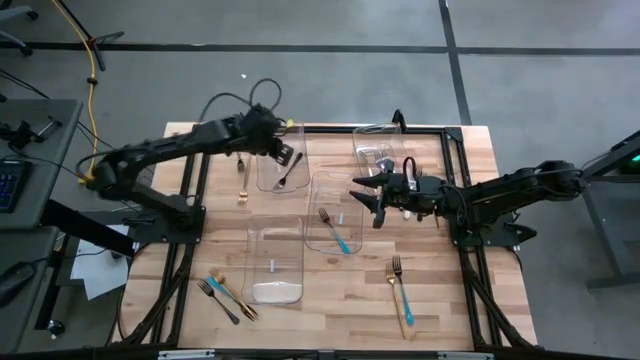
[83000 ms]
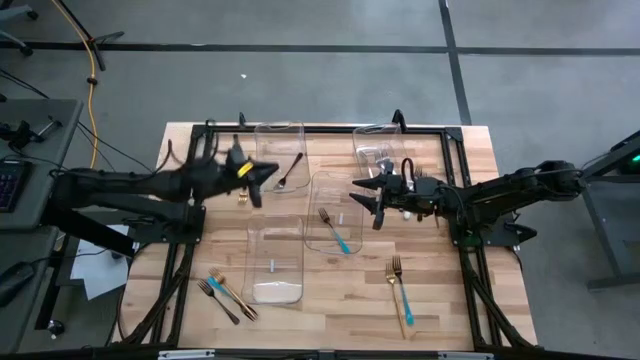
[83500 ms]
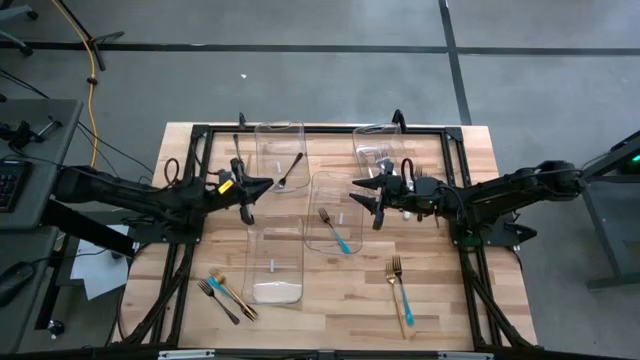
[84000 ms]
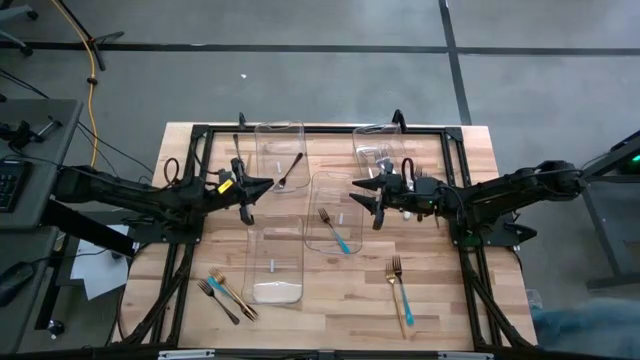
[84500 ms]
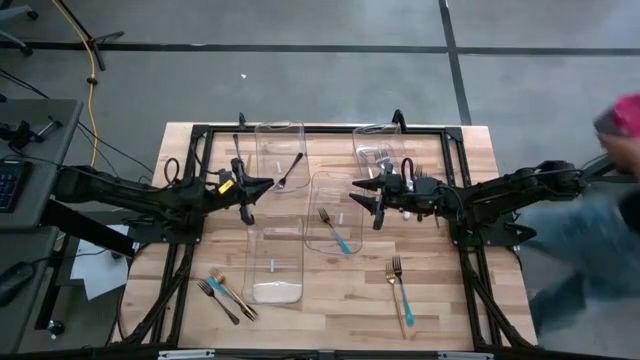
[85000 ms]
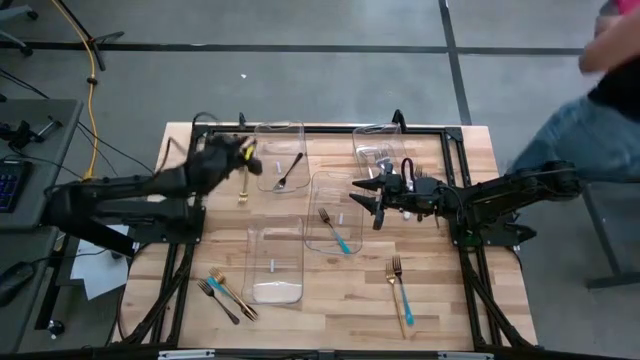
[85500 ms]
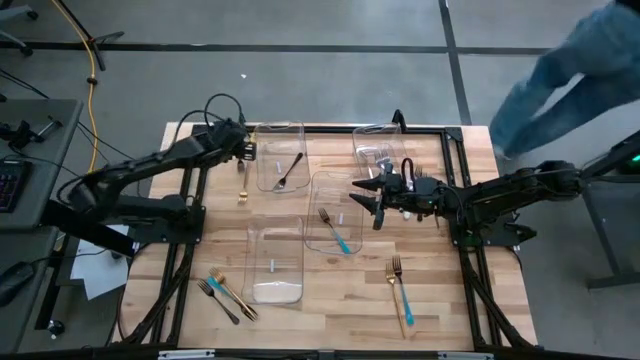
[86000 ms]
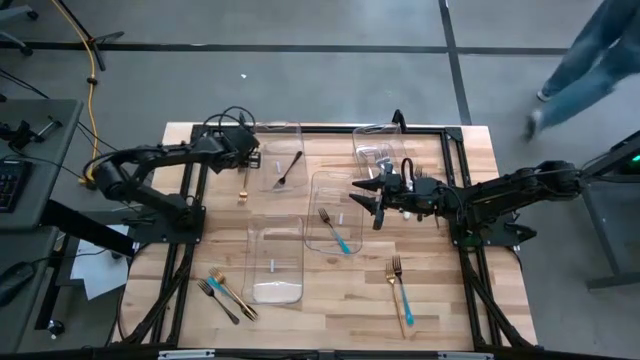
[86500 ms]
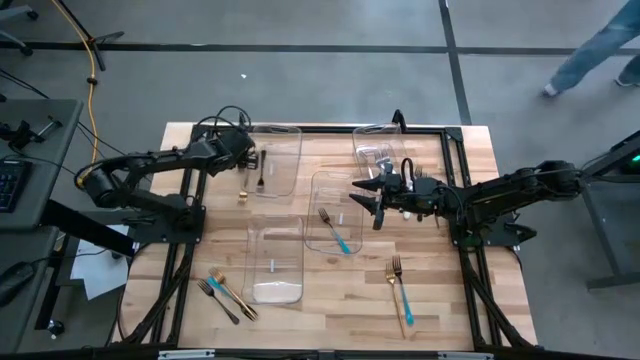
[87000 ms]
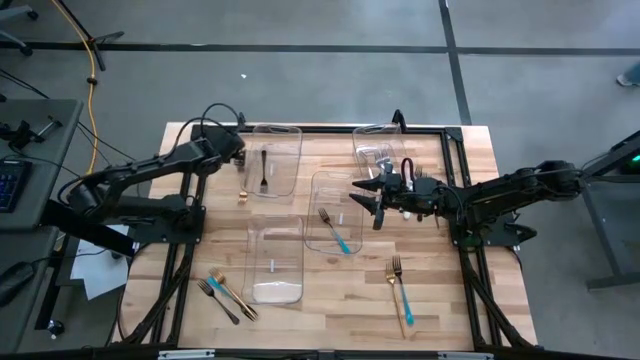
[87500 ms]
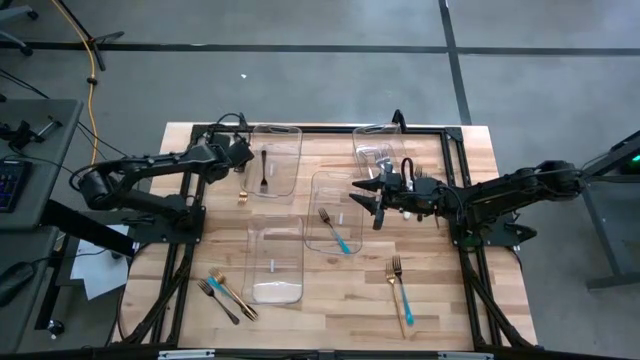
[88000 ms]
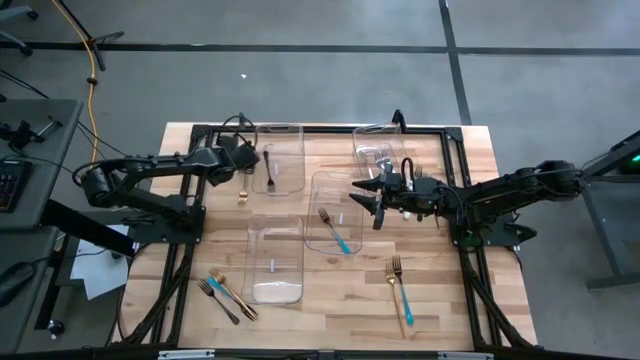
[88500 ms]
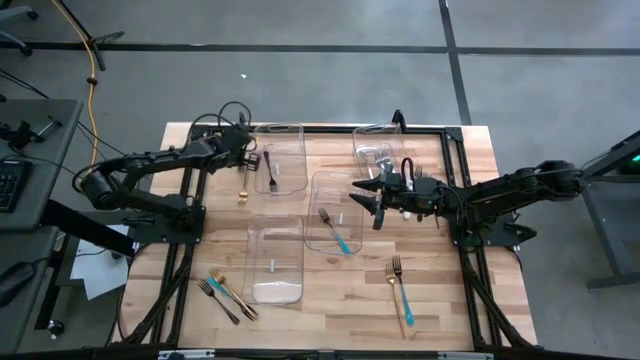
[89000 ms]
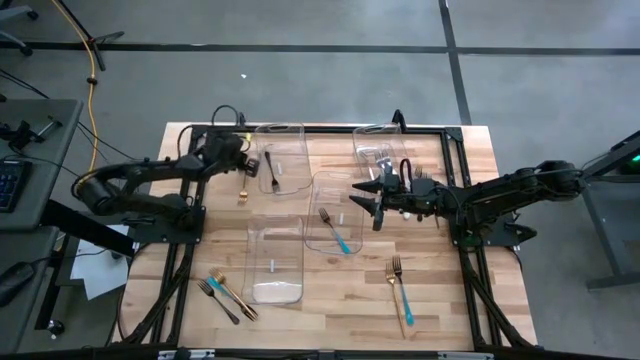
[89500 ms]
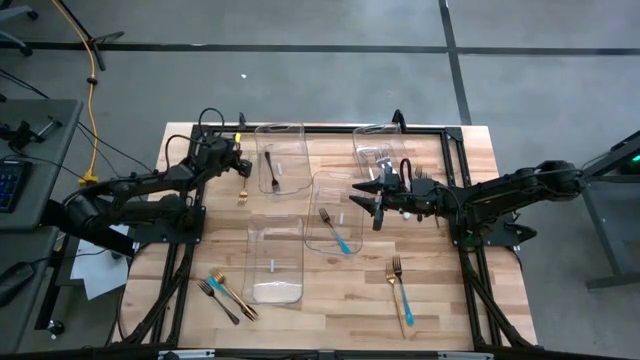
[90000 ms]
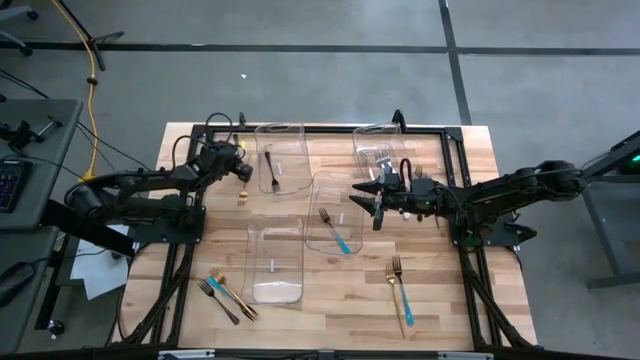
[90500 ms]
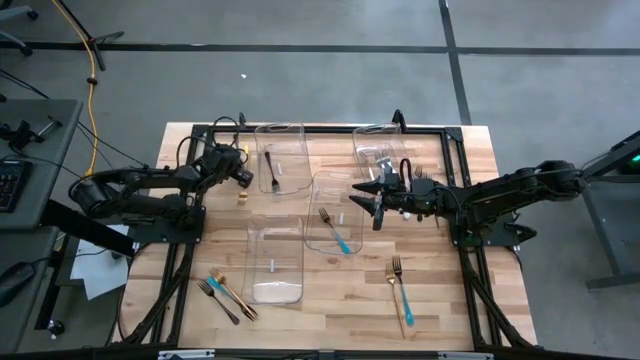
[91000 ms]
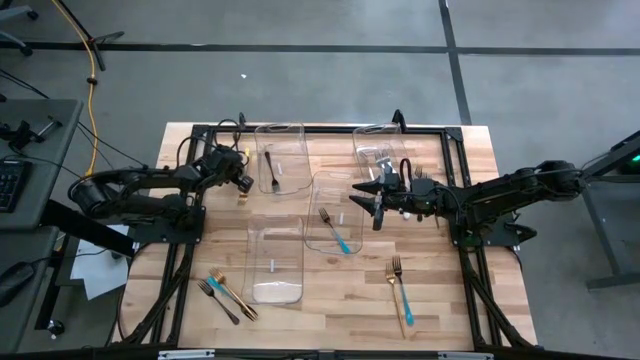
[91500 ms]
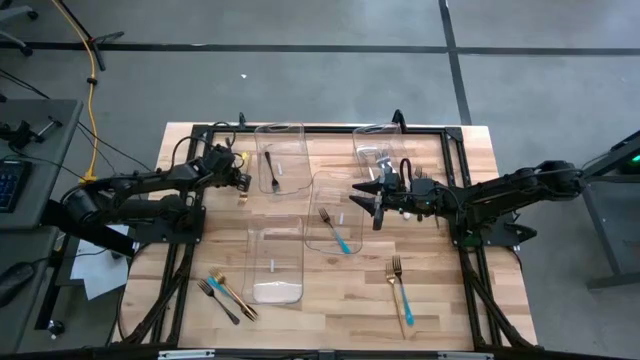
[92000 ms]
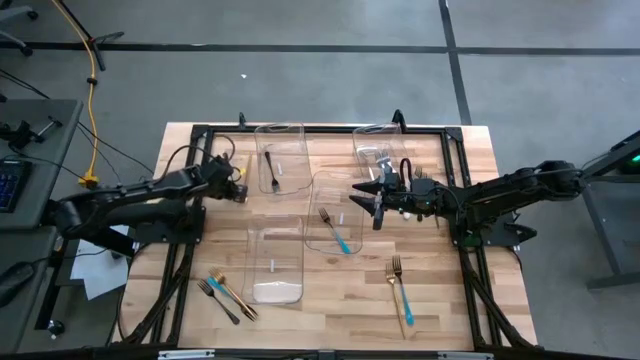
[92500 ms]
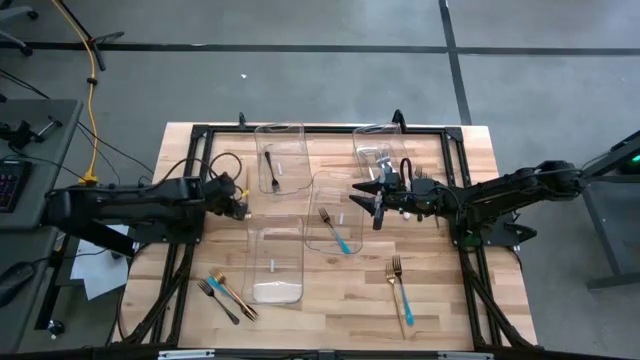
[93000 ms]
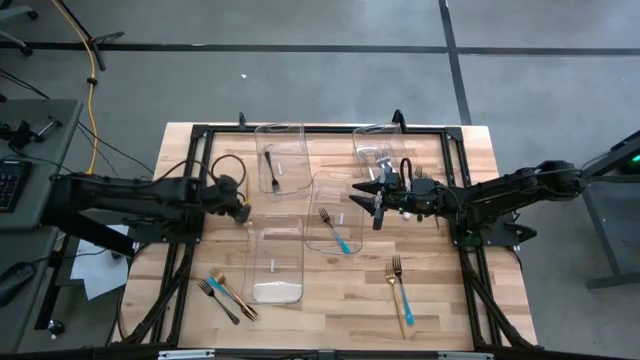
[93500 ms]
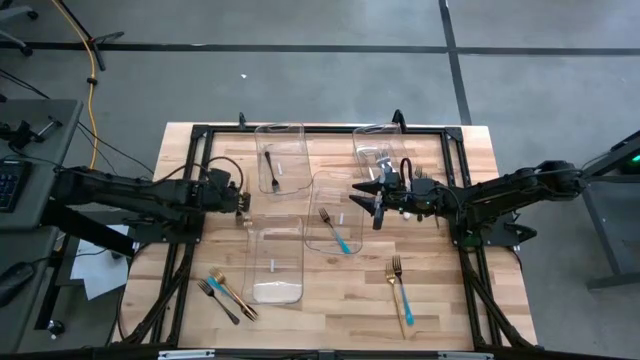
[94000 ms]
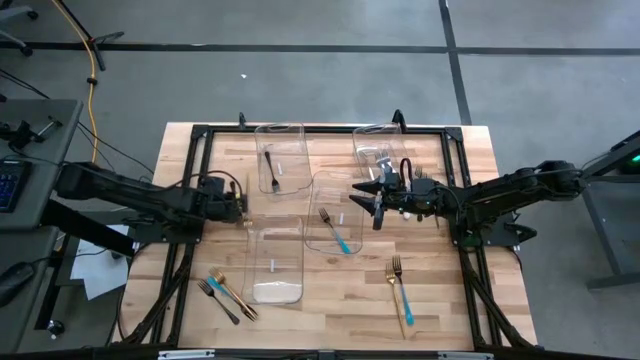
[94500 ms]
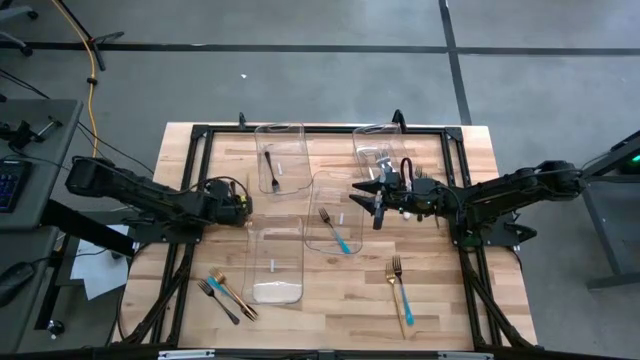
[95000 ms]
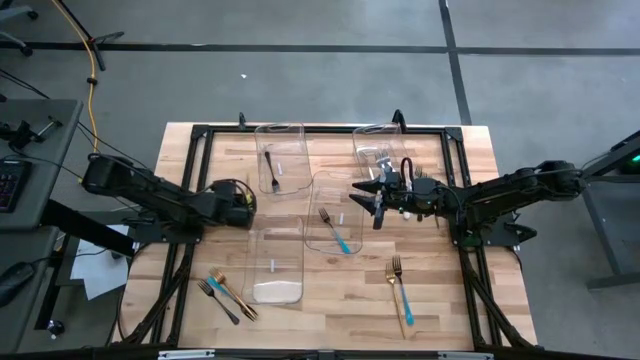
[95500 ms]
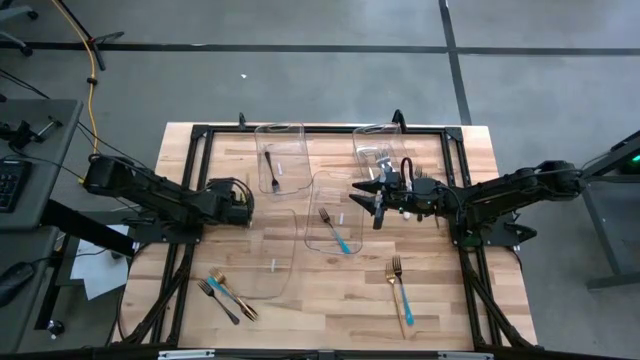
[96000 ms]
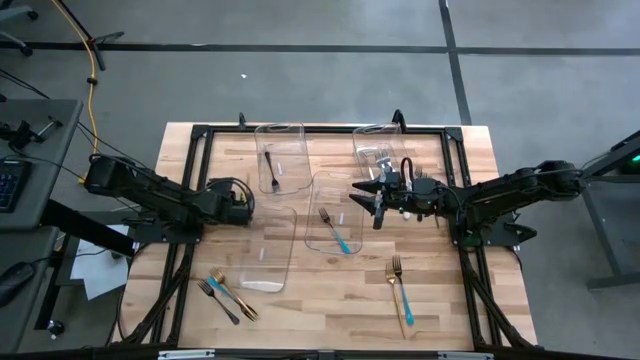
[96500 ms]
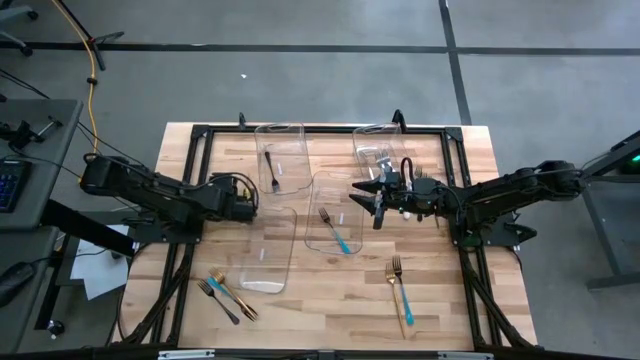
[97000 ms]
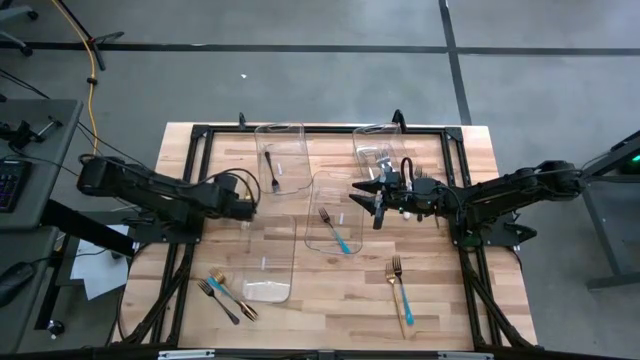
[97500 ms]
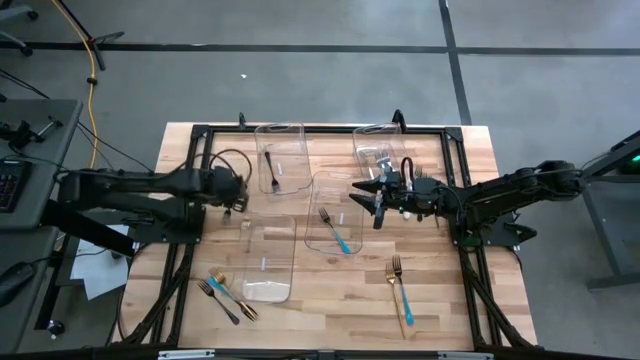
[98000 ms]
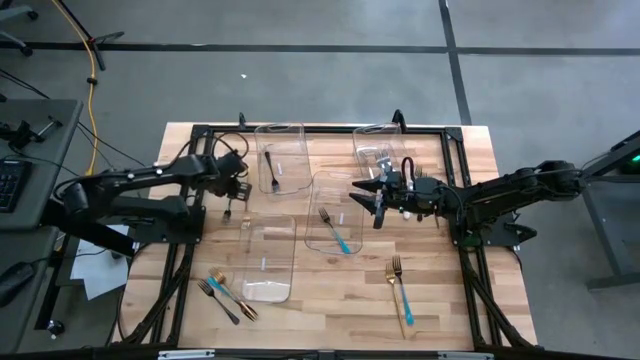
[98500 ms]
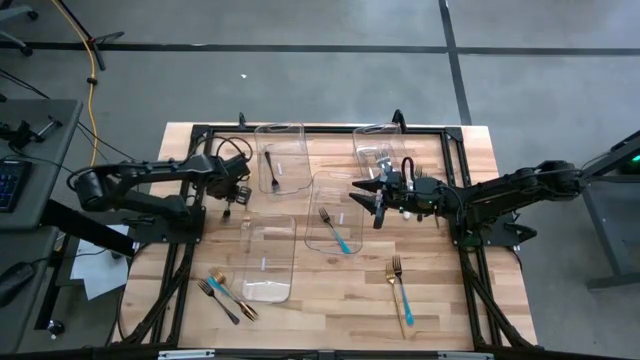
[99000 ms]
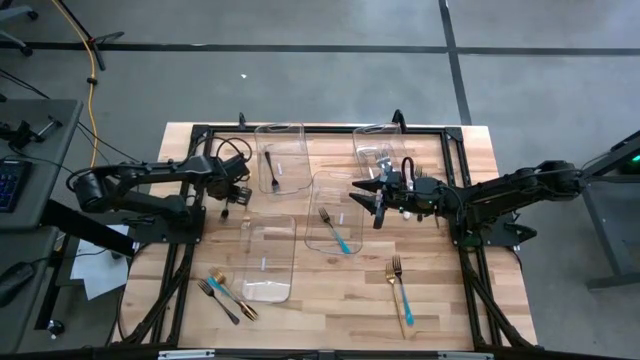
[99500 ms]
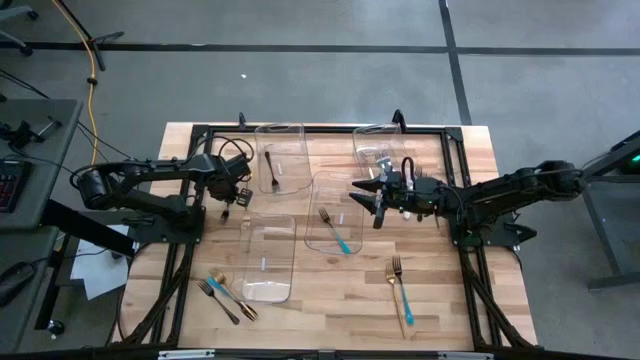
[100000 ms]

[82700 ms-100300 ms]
Task: Sort silverware by color (type)
Put the black fork into the top left transparent bin

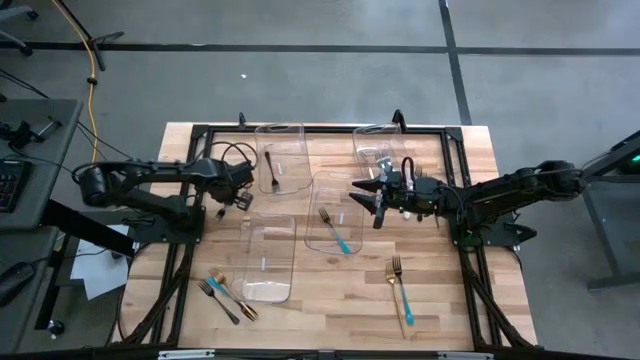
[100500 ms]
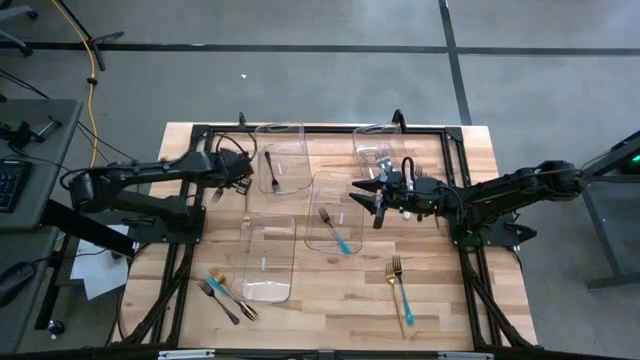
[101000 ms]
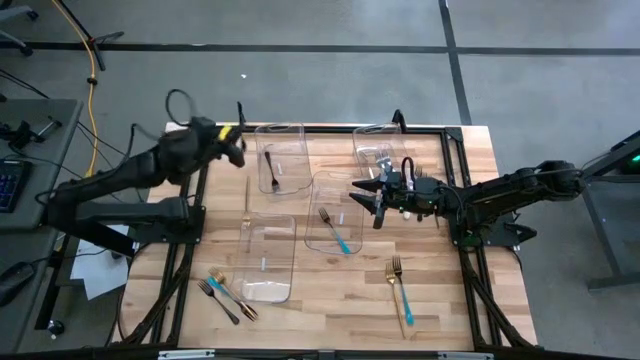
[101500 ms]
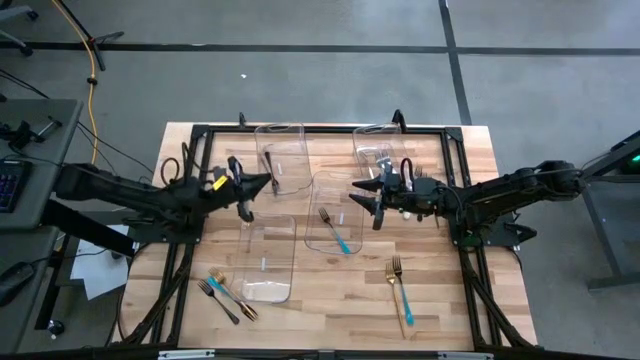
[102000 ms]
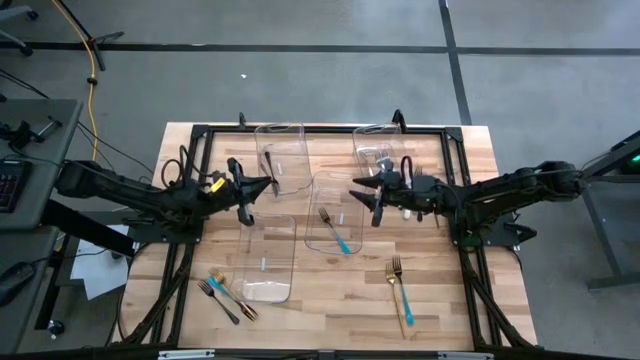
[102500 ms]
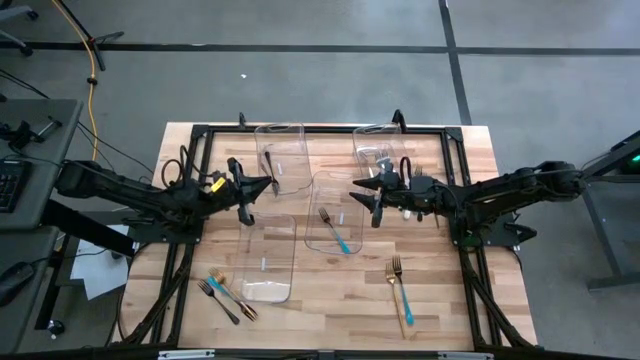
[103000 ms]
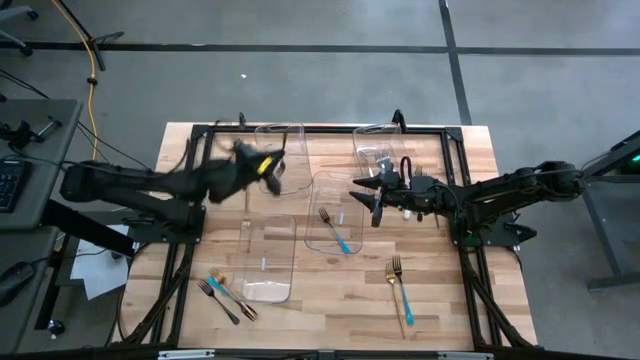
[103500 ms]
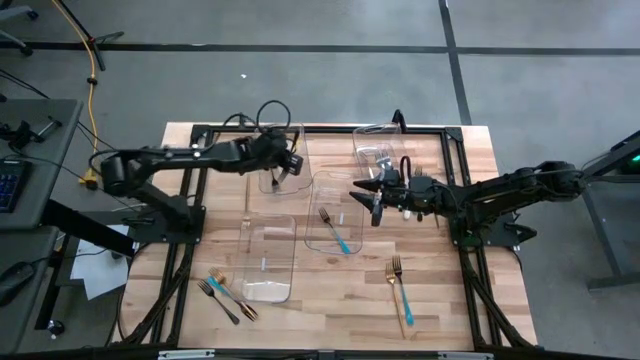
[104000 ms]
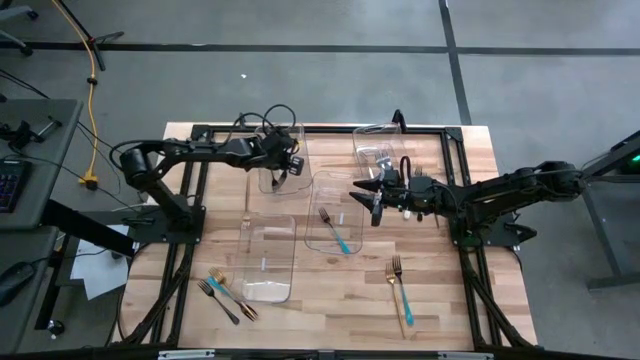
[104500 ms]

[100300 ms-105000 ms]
Put the black fork into the top left transparent bin
